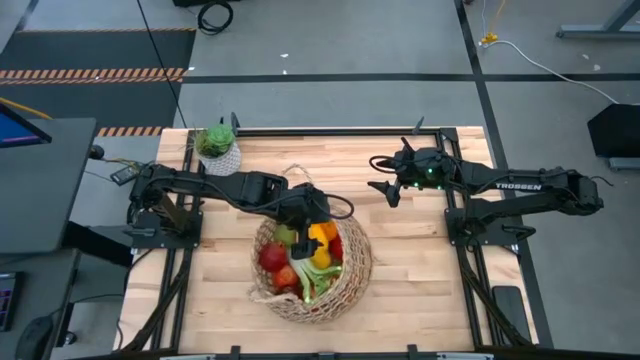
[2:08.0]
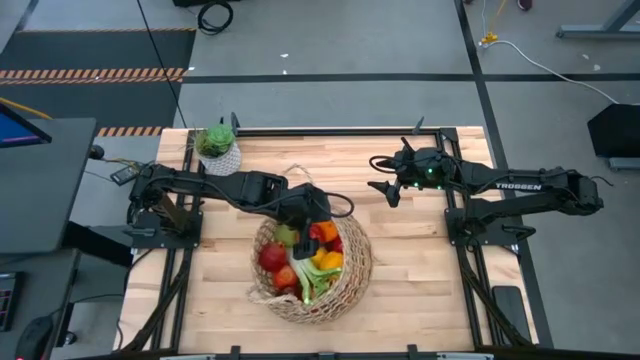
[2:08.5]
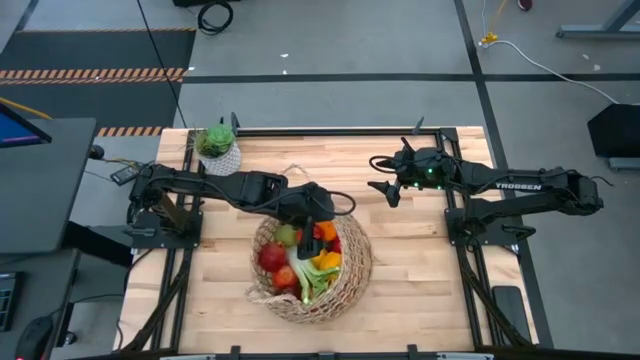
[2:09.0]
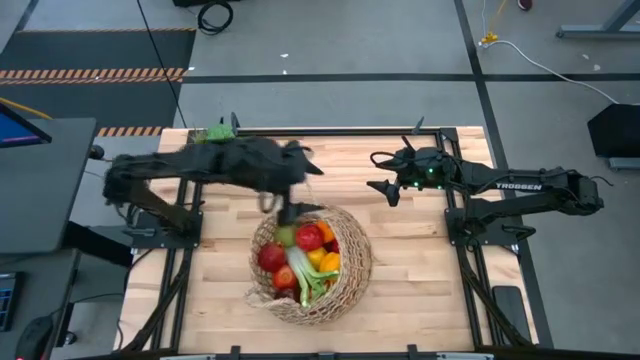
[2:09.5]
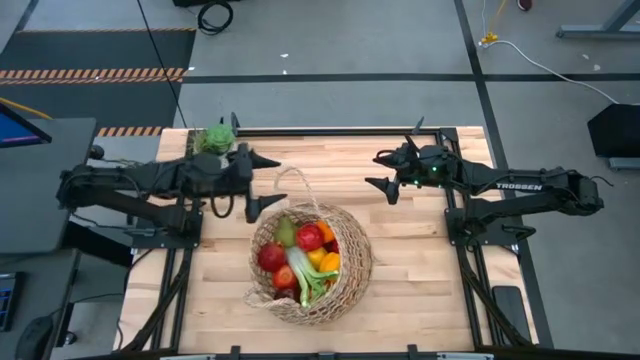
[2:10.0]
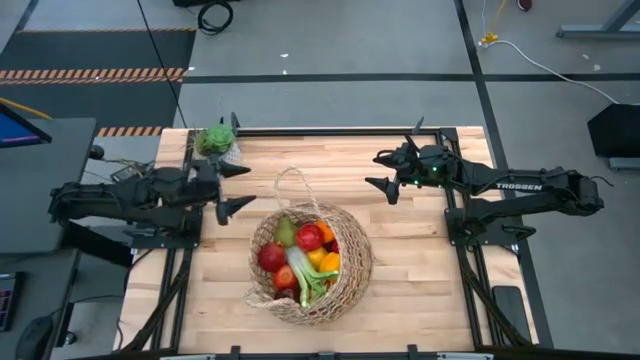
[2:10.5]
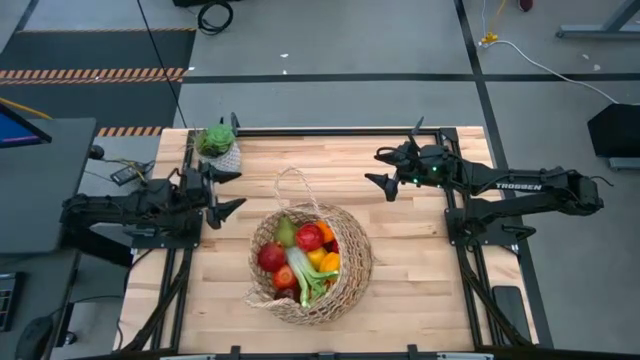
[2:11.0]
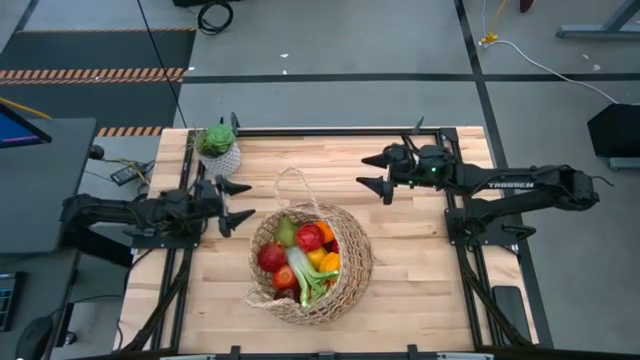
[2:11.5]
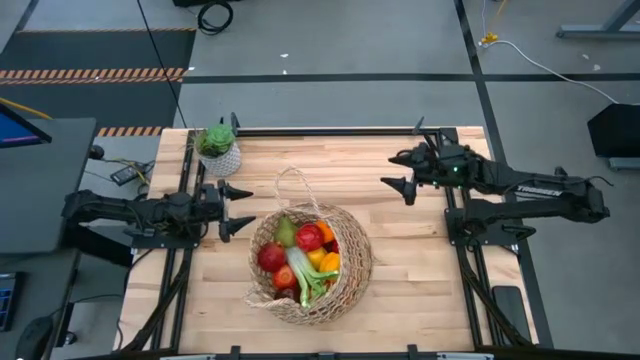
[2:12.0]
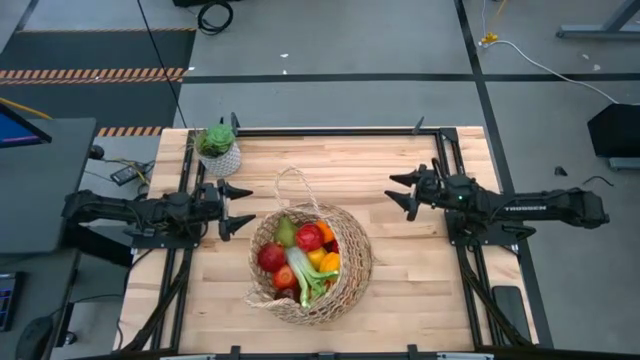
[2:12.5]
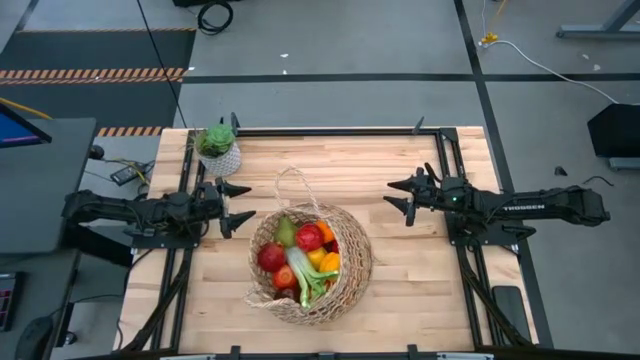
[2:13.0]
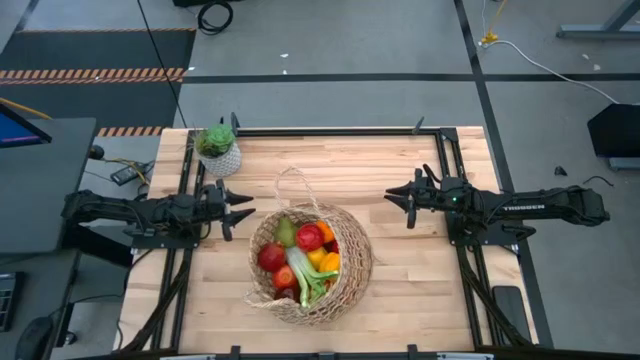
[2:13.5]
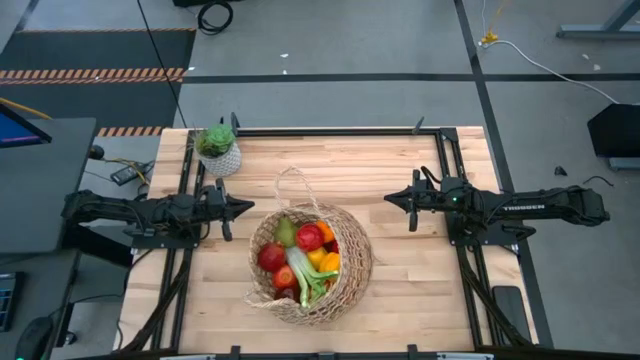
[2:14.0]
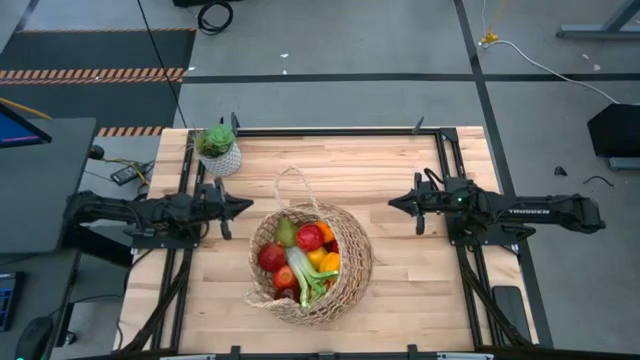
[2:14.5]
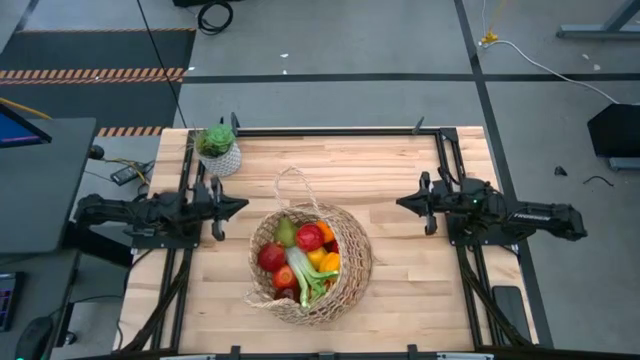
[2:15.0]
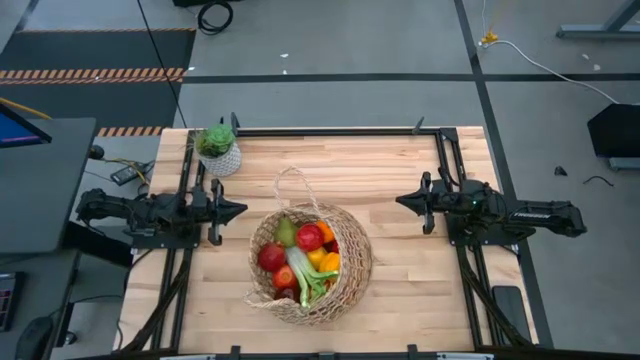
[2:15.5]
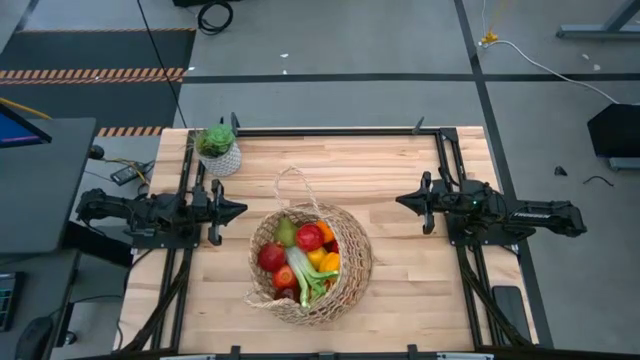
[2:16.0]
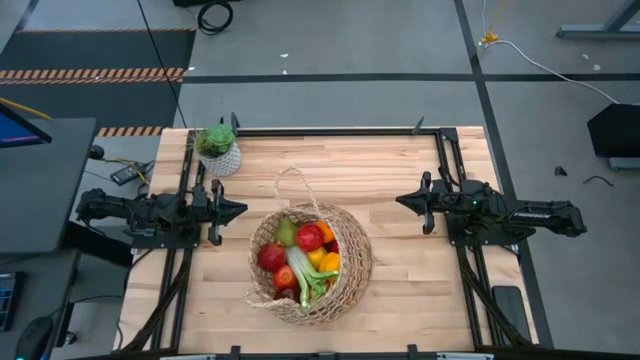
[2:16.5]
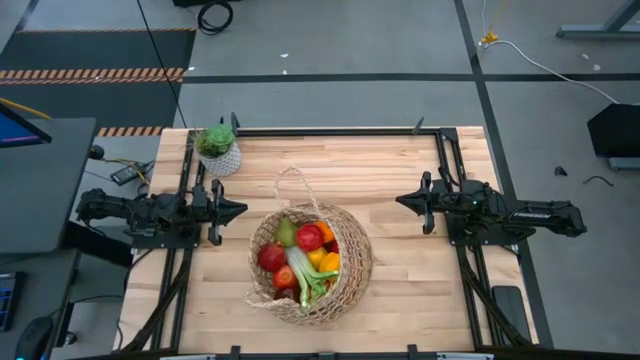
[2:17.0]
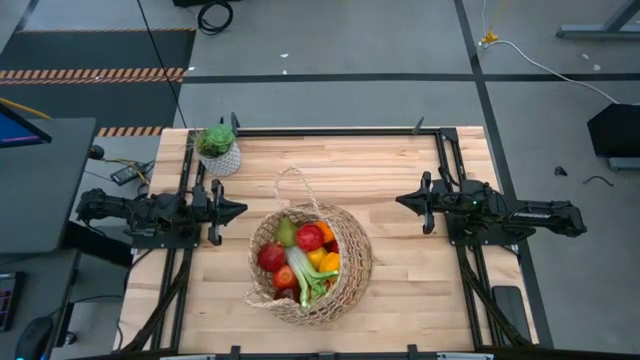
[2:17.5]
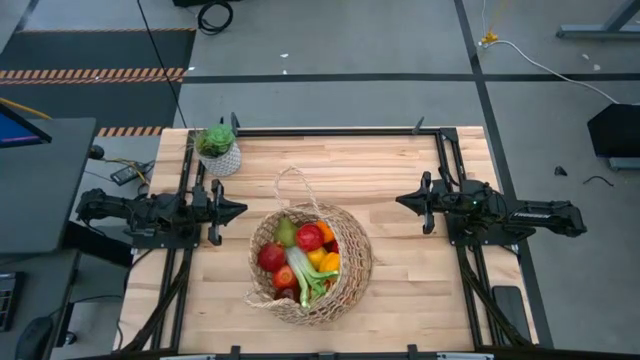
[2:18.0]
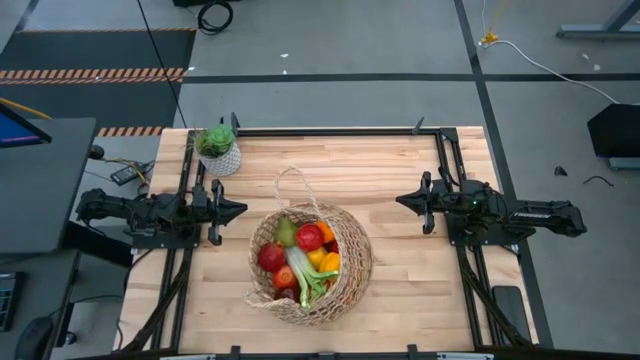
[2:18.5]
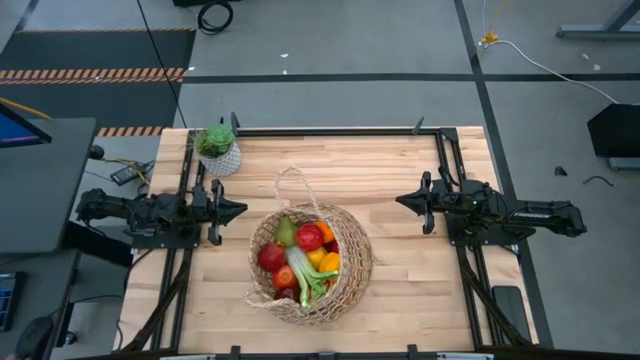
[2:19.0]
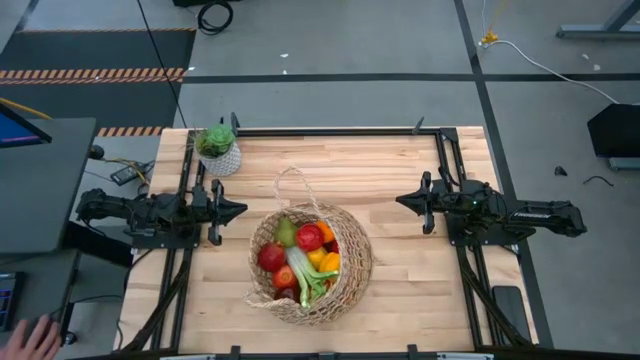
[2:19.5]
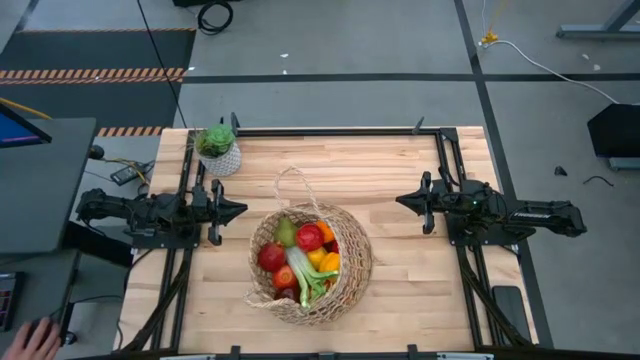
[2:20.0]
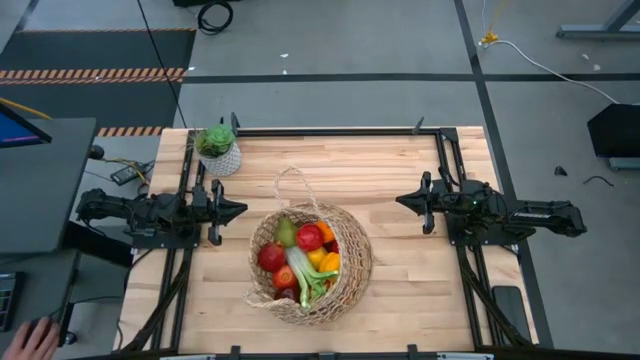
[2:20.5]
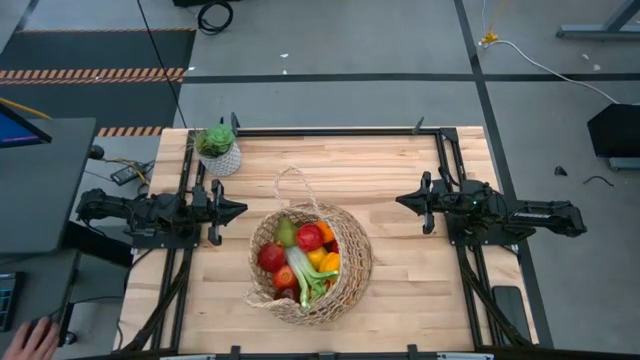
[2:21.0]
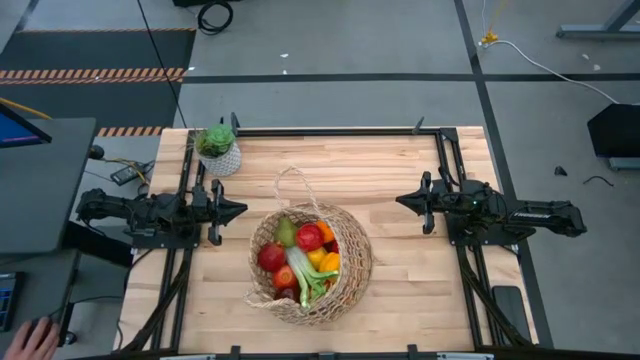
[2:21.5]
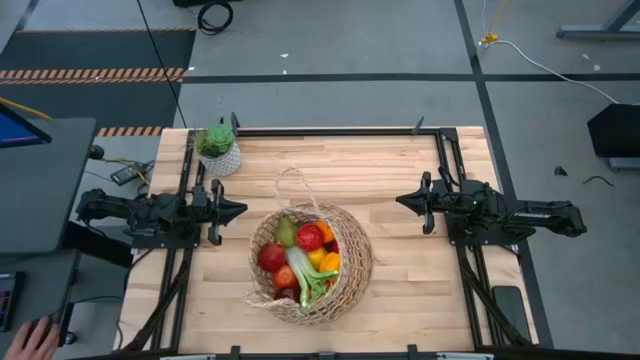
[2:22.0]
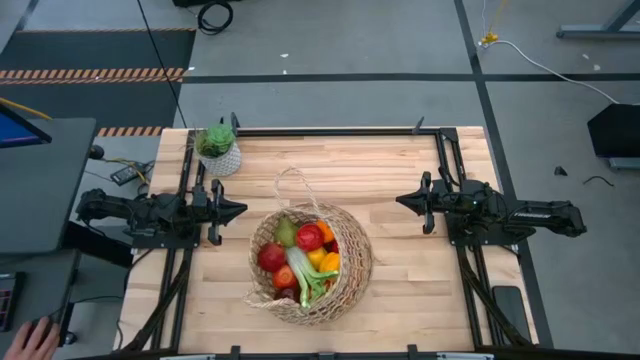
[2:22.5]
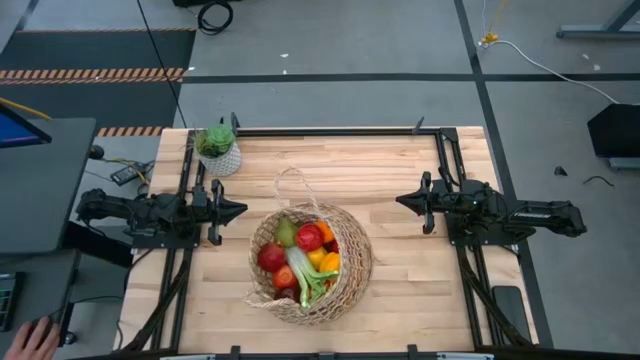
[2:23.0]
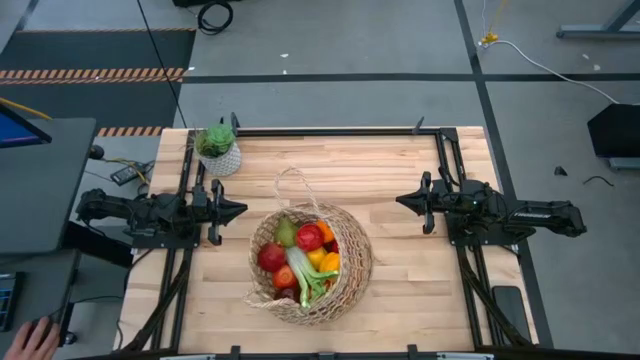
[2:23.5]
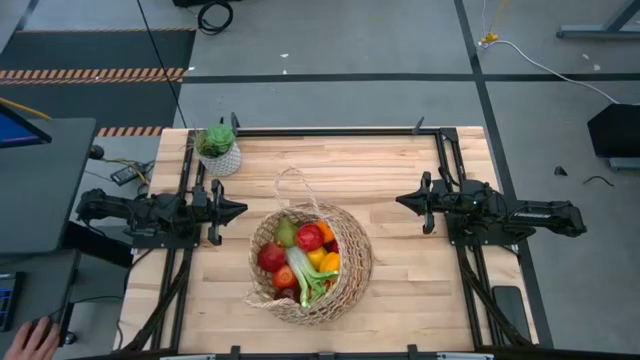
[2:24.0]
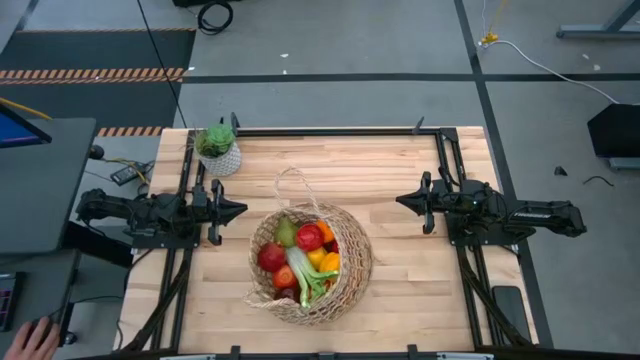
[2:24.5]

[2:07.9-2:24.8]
Task: Build produce basket
Return to home position
